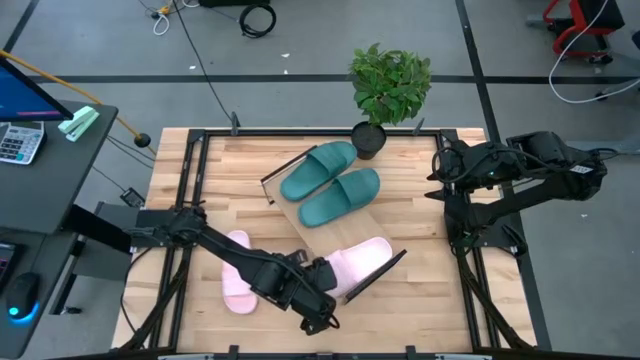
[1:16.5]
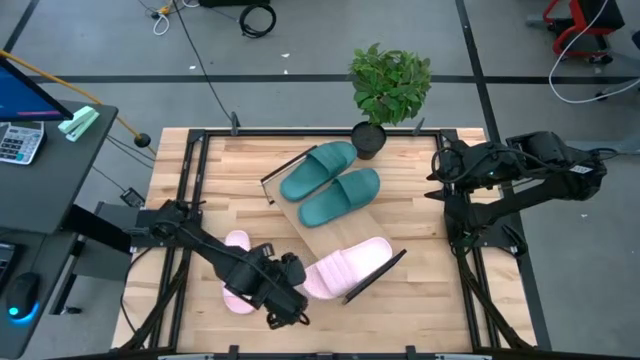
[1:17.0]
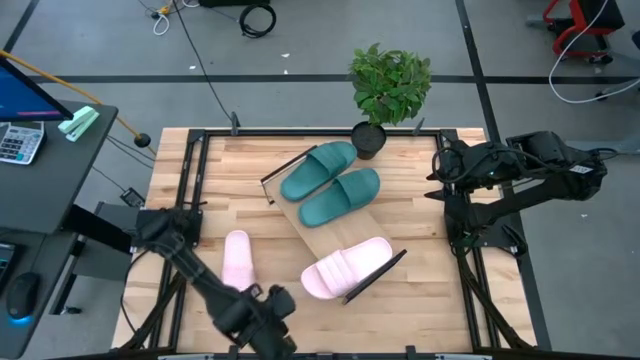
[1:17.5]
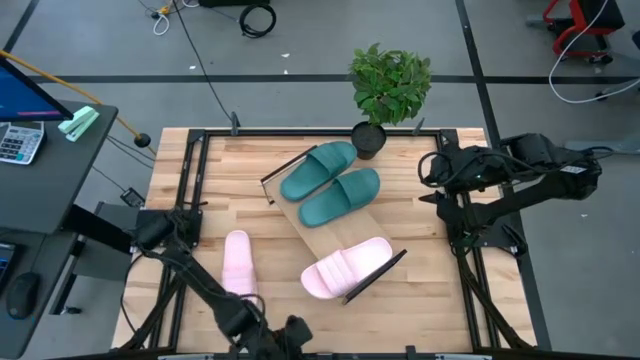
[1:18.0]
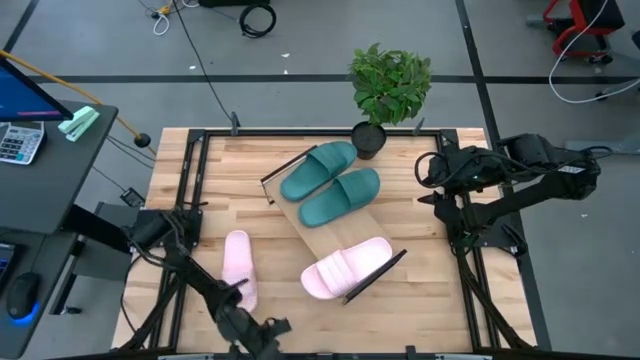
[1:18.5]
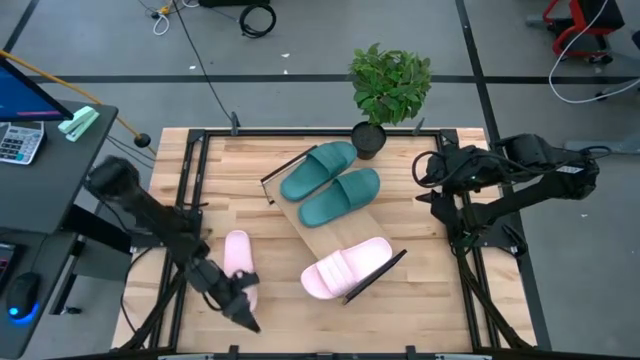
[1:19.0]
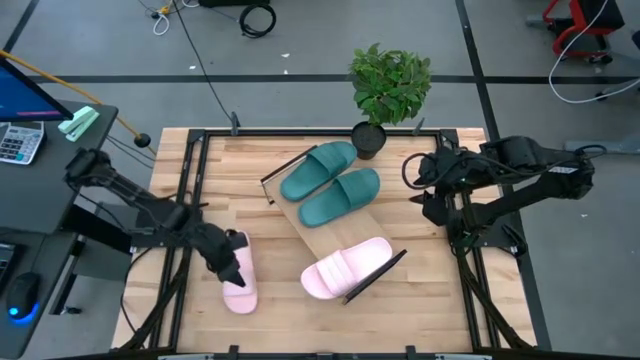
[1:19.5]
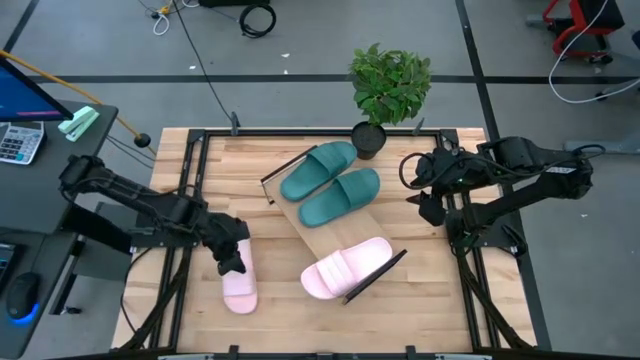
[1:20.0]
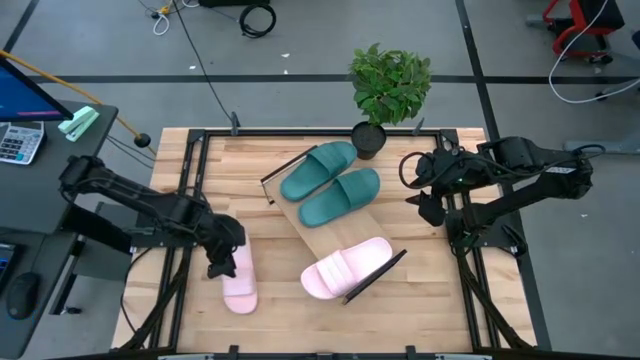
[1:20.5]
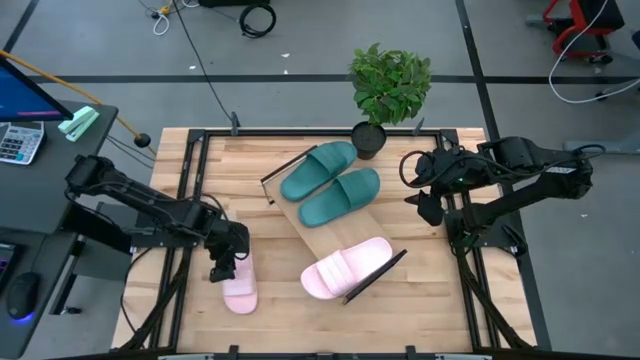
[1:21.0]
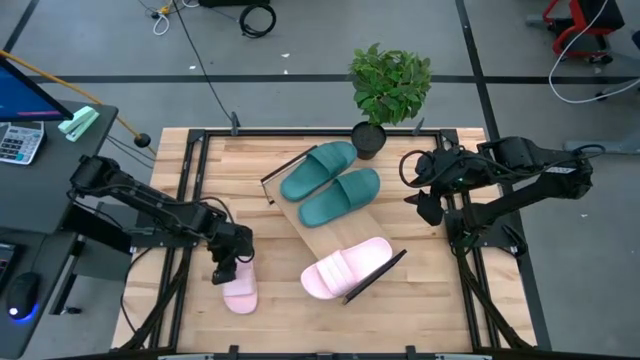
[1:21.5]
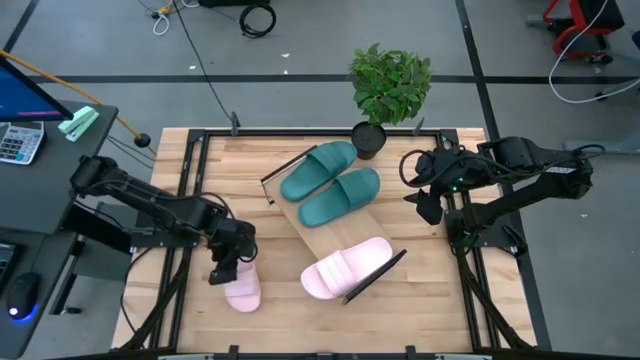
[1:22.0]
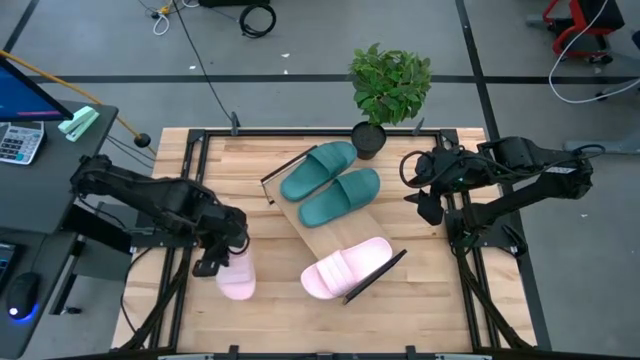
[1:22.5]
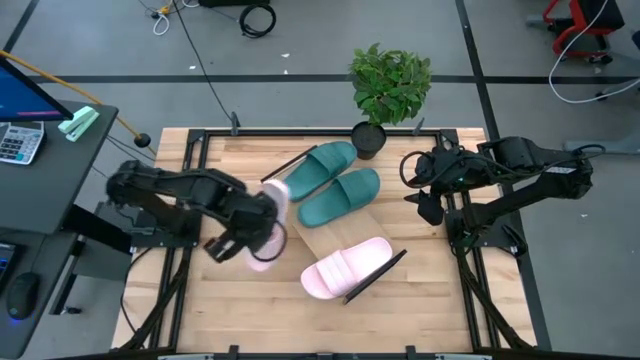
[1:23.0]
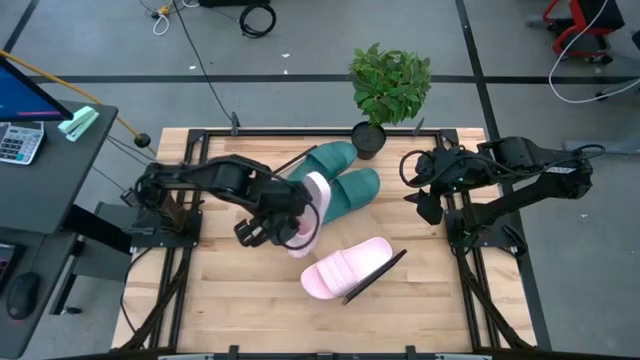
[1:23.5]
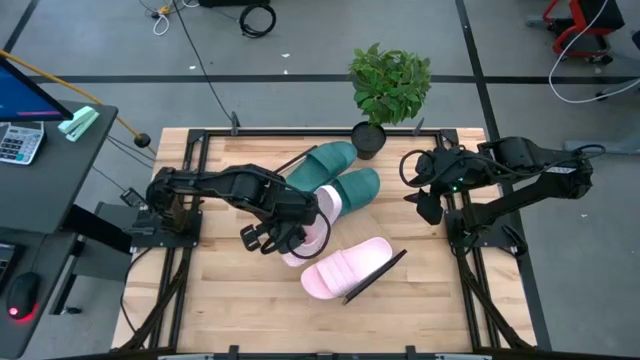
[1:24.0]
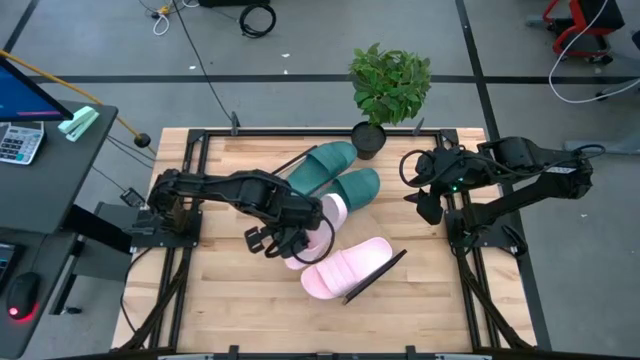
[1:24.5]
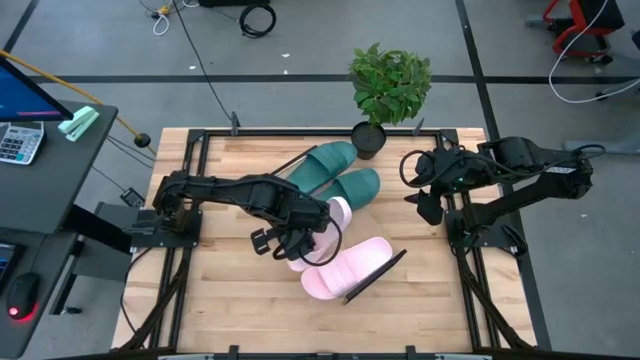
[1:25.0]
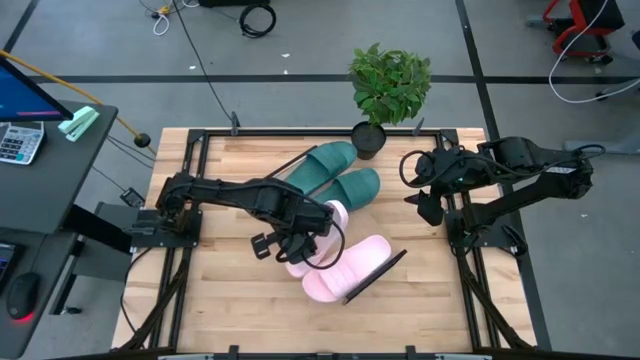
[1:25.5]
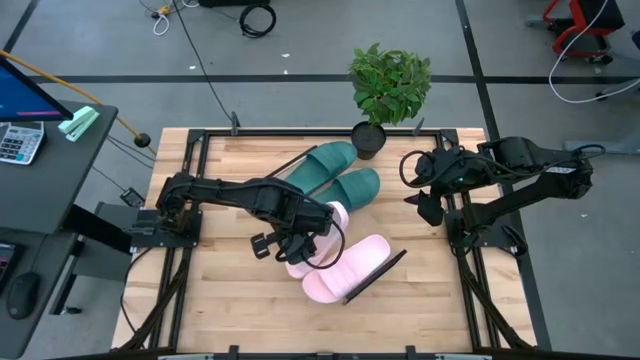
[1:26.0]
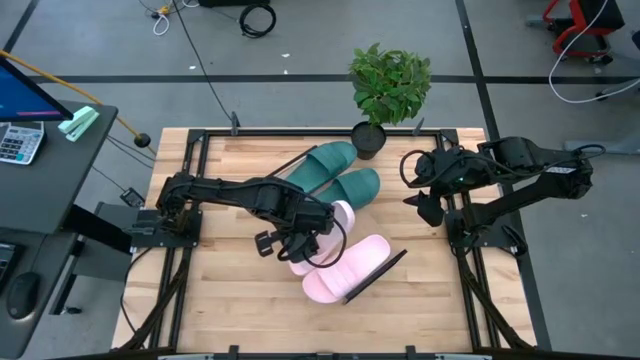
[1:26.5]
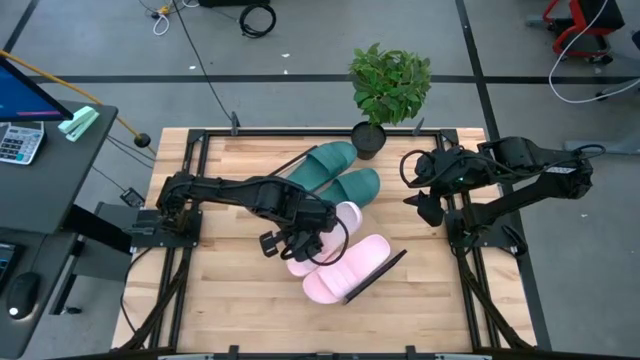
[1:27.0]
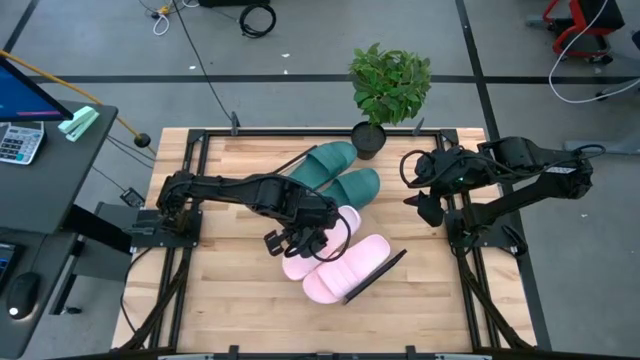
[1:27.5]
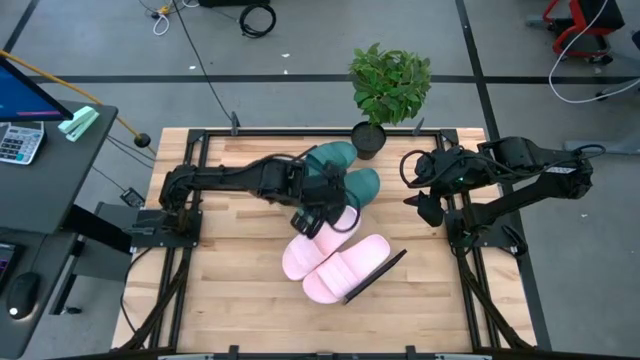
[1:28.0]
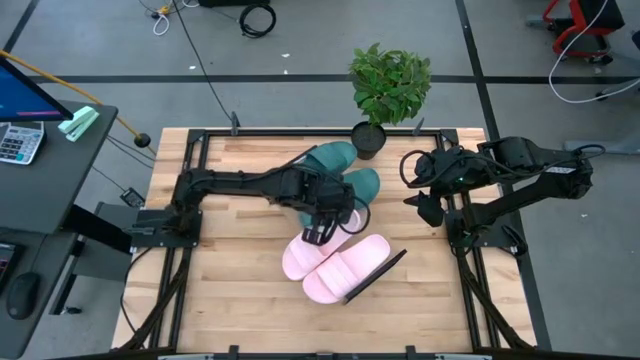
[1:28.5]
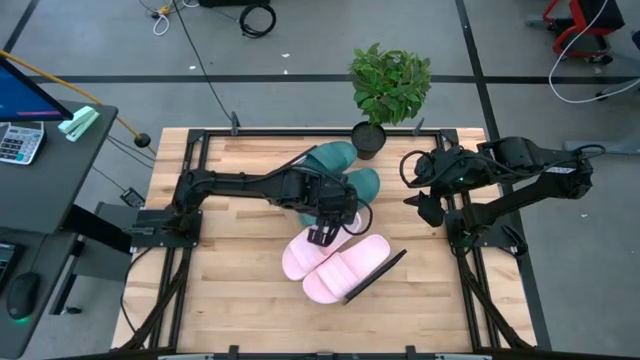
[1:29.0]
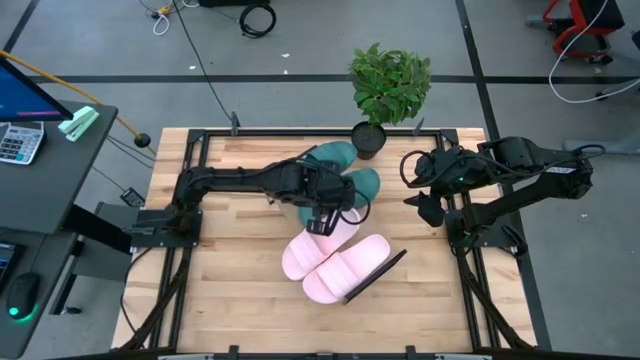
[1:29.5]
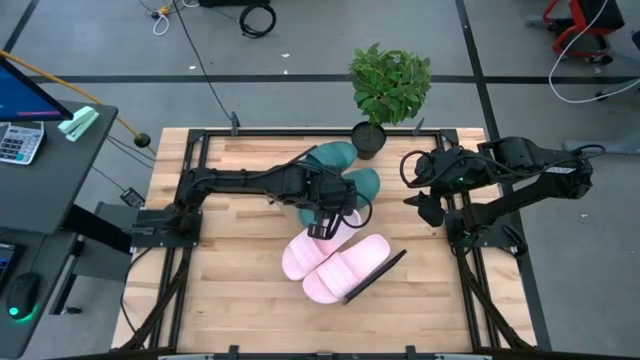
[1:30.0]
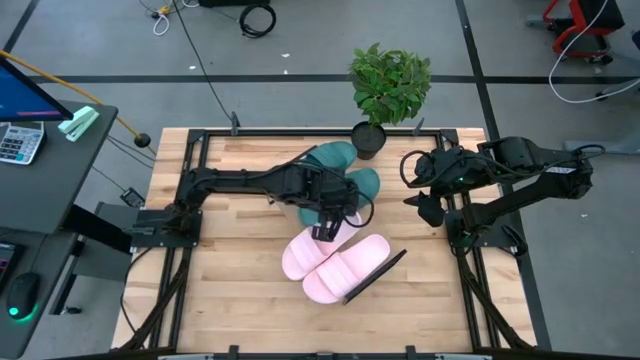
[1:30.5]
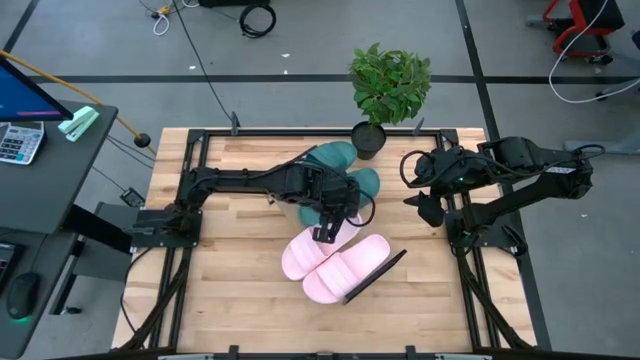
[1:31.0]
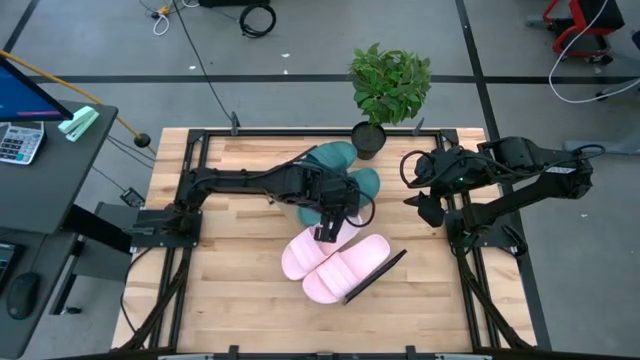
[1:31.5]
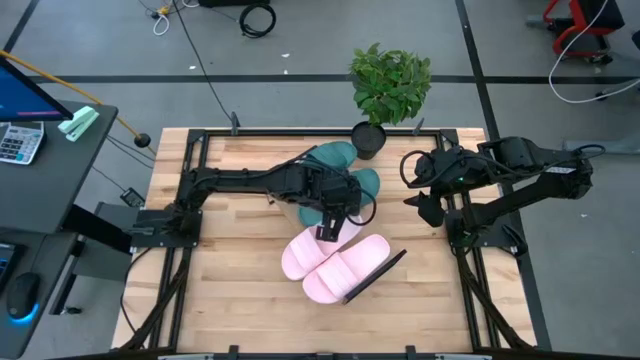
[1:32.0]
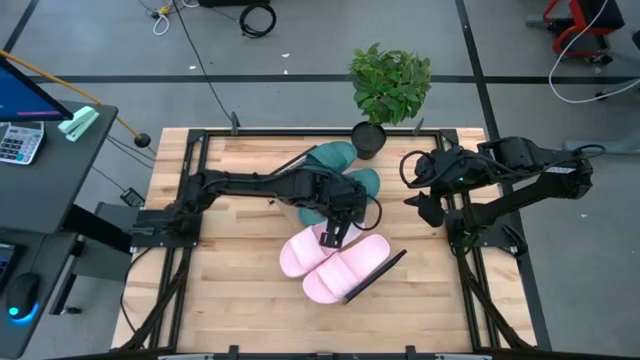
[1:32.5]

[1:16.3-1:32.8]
Task: Pick and place slides into the shelf
Put the pink slide on the shelf

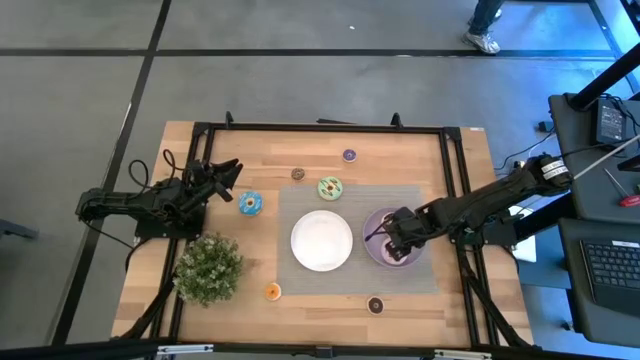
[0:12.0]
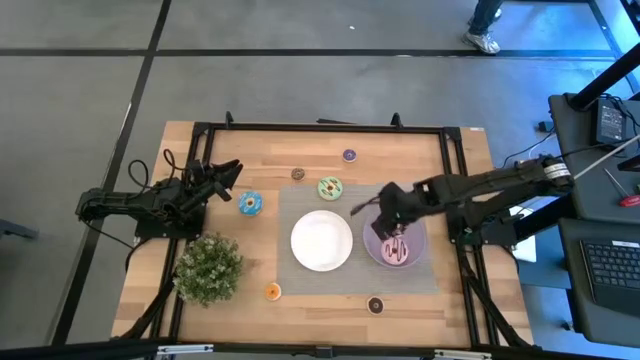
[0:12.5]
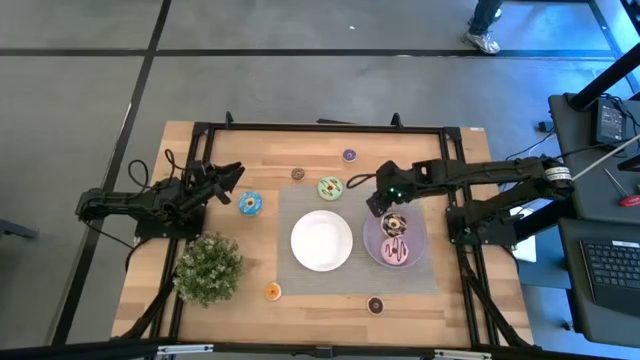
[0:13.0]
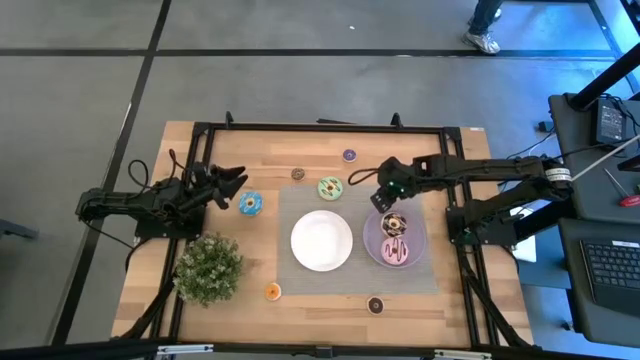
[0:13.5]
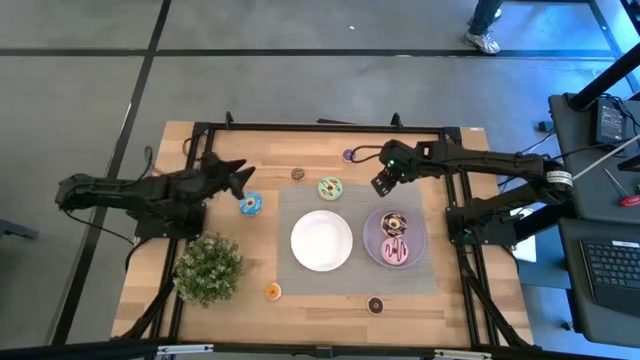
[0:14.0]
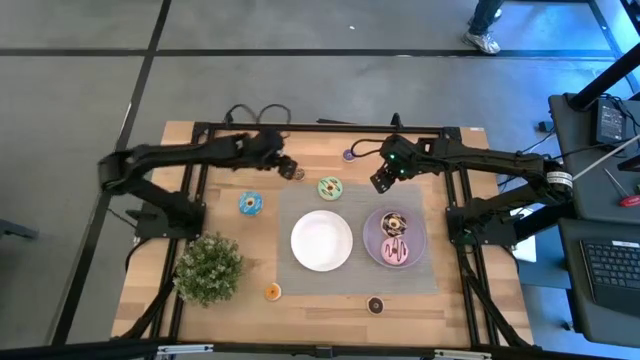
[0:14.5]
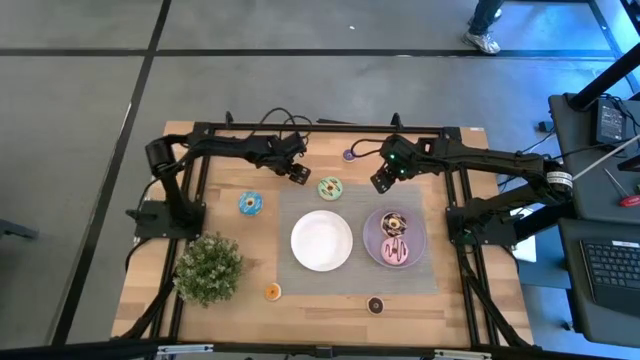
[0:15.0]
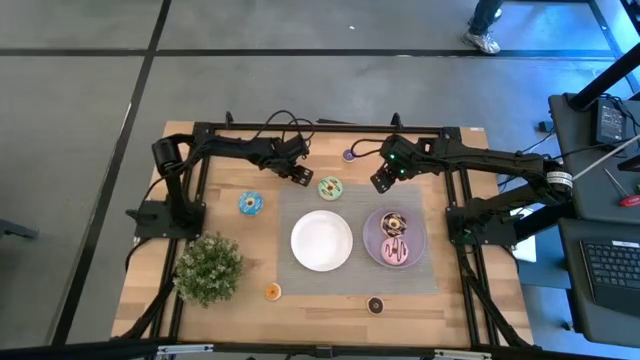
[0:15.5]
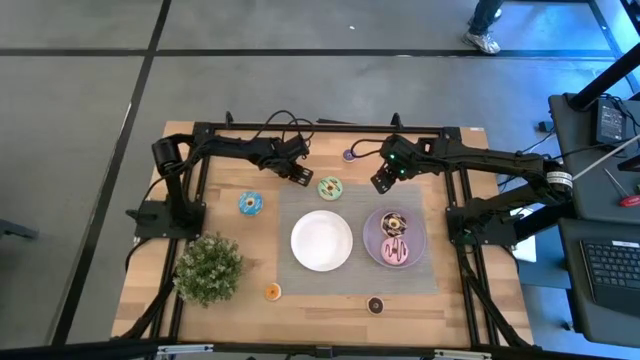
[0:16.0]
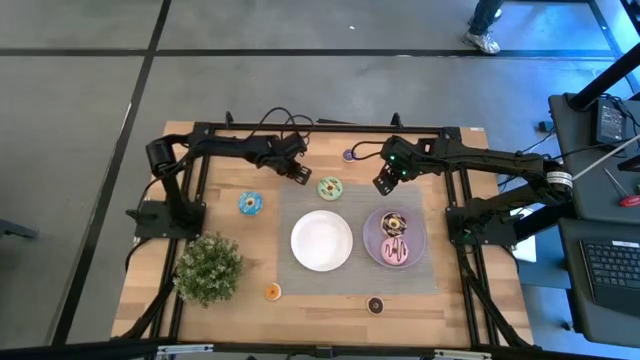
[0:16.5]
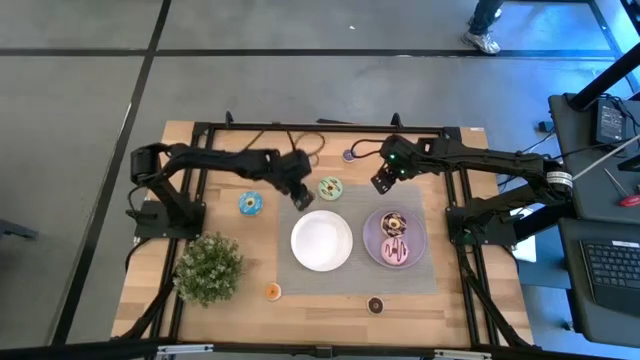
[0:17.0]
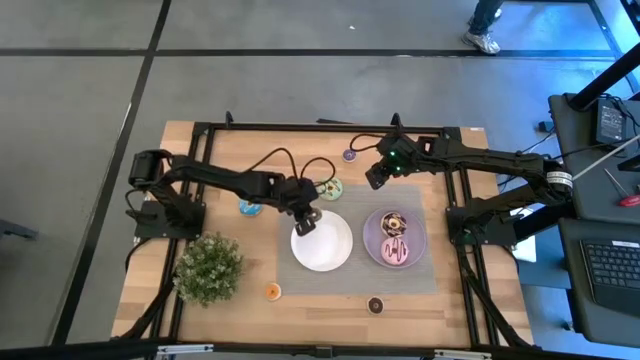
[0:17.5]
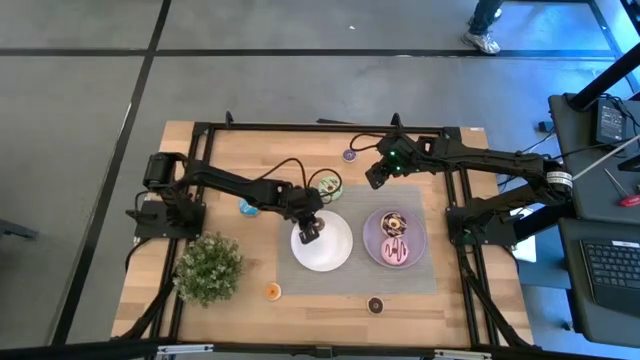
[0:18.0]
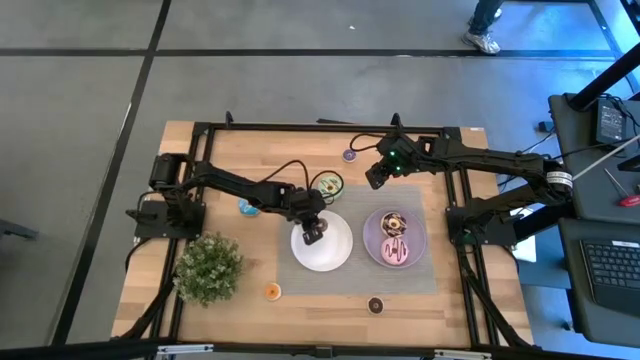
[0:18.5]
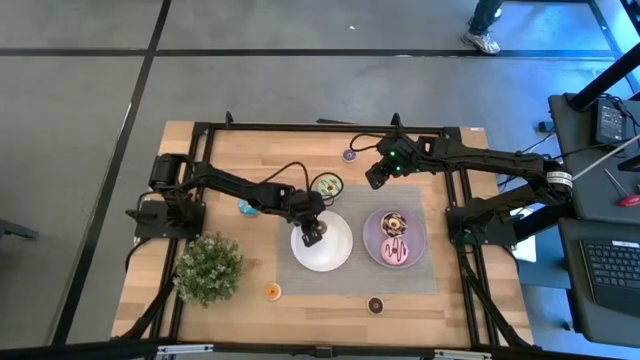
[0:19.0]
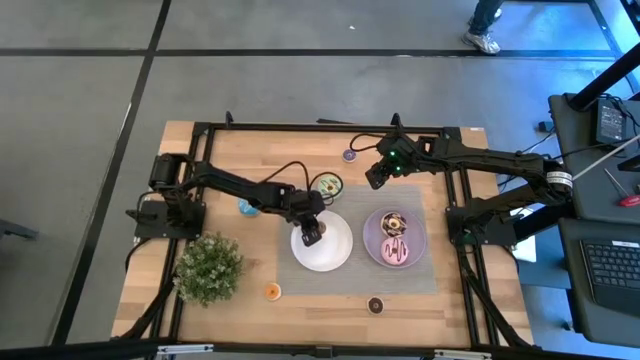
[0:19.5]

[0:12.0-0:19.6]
Task: Pick & Place donuts
Put the small brown donut on the white plate
